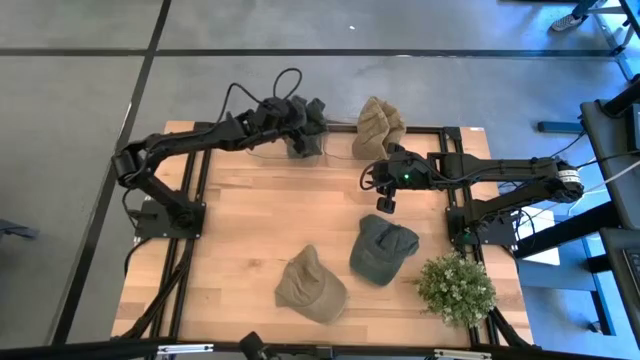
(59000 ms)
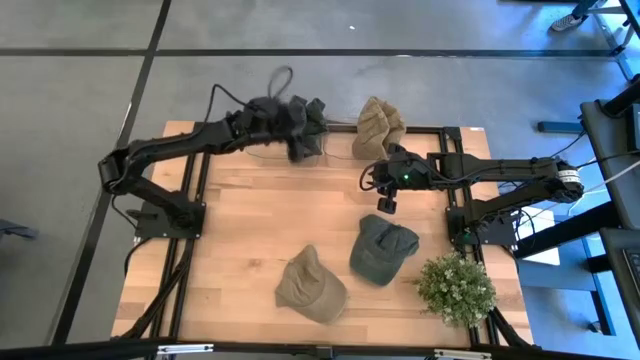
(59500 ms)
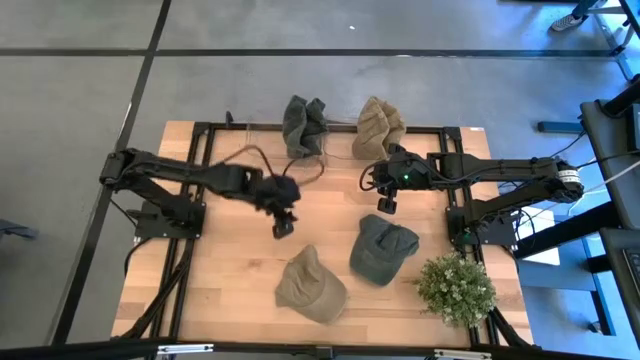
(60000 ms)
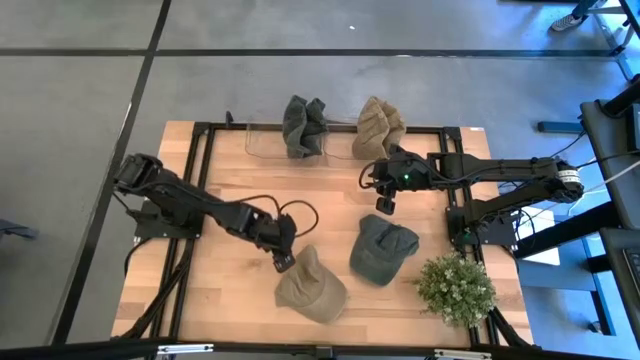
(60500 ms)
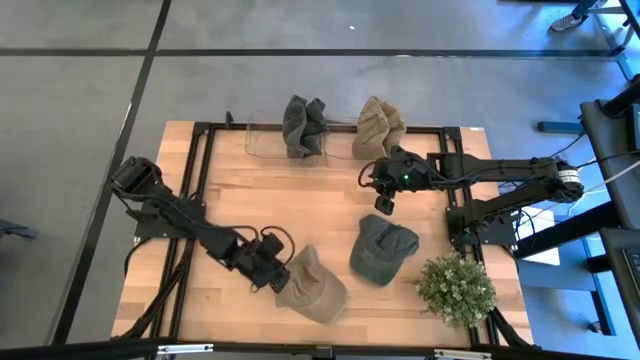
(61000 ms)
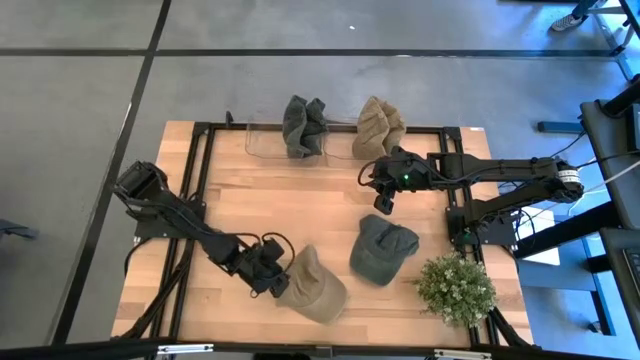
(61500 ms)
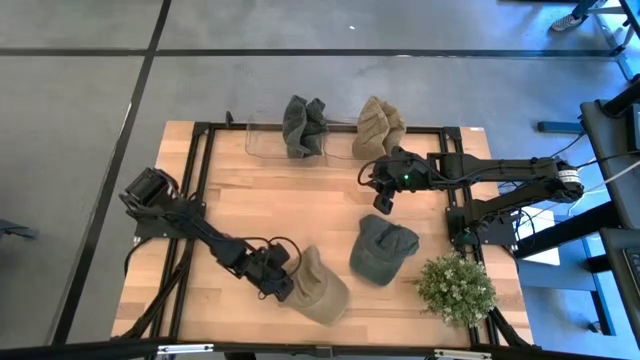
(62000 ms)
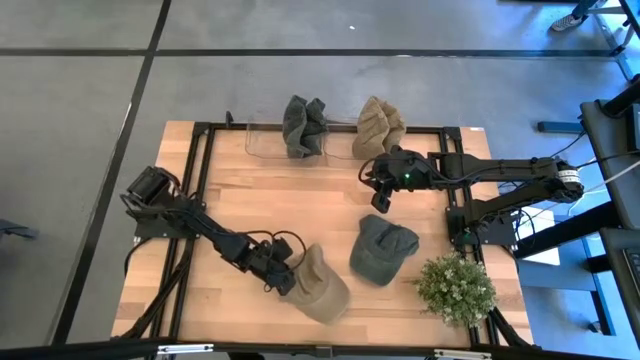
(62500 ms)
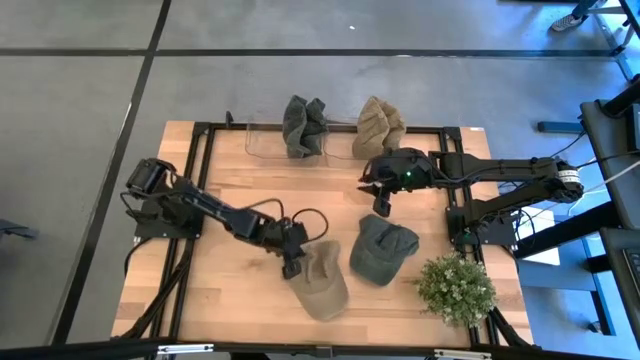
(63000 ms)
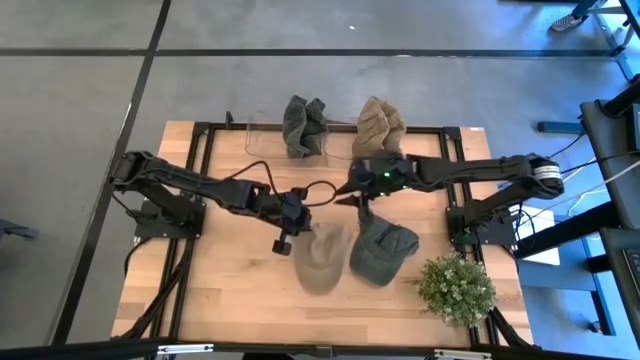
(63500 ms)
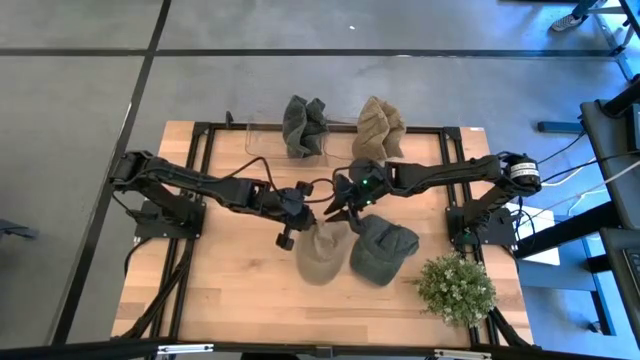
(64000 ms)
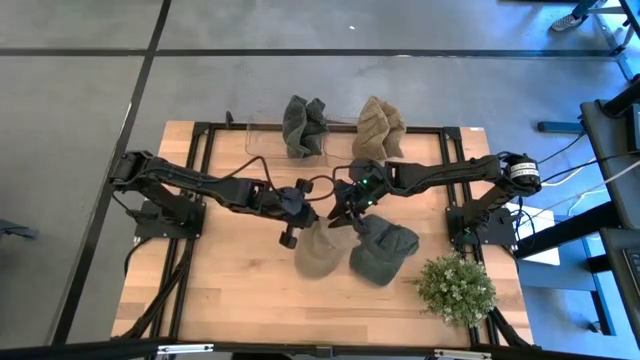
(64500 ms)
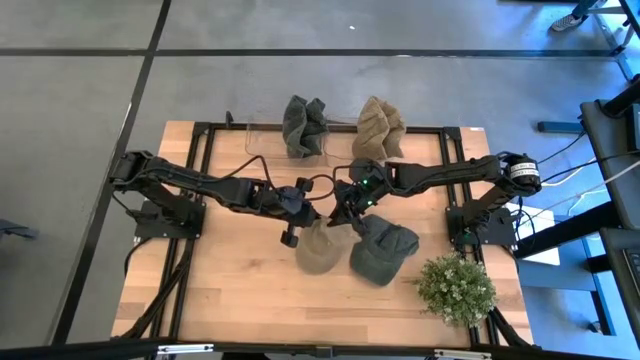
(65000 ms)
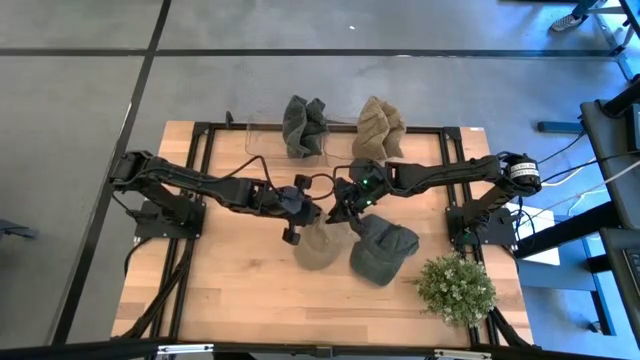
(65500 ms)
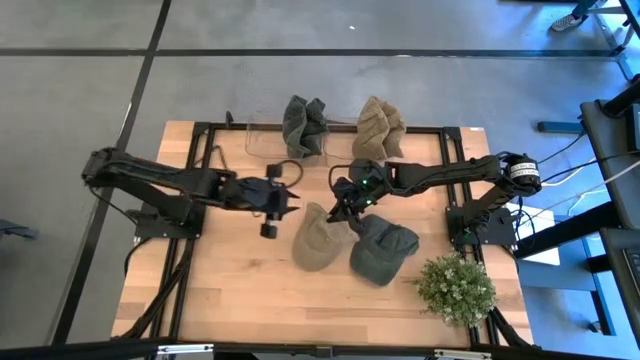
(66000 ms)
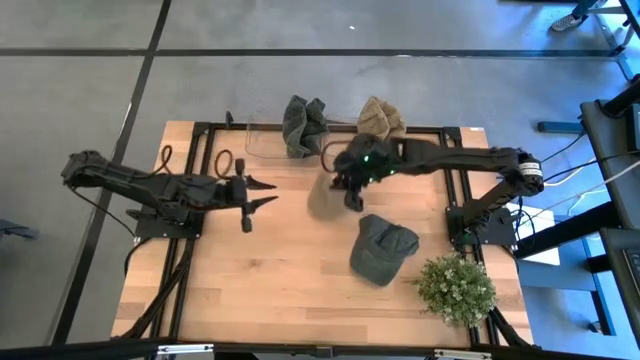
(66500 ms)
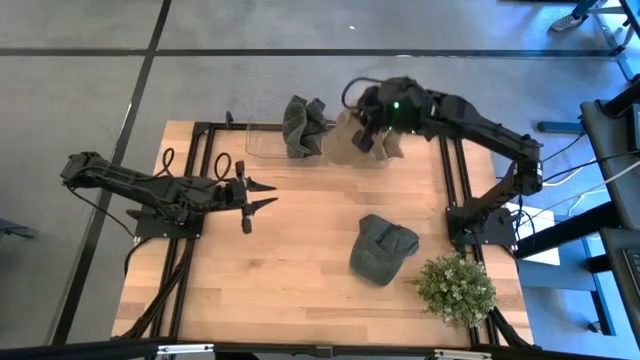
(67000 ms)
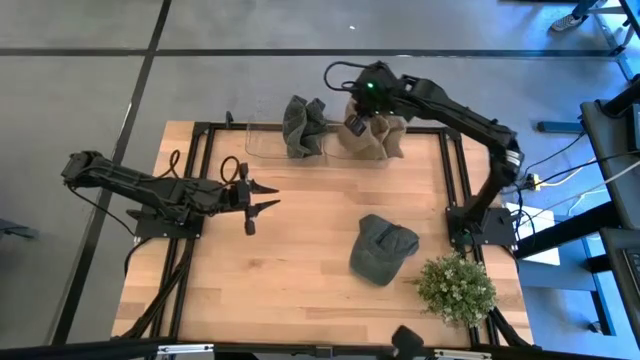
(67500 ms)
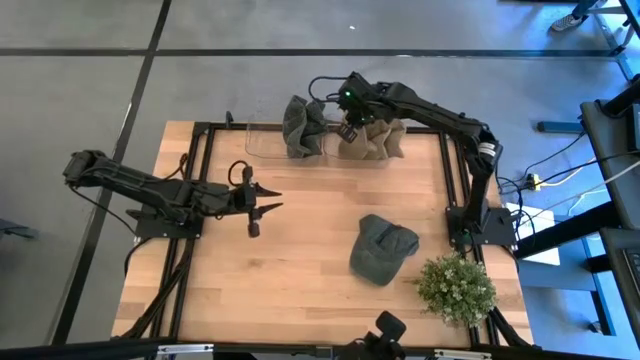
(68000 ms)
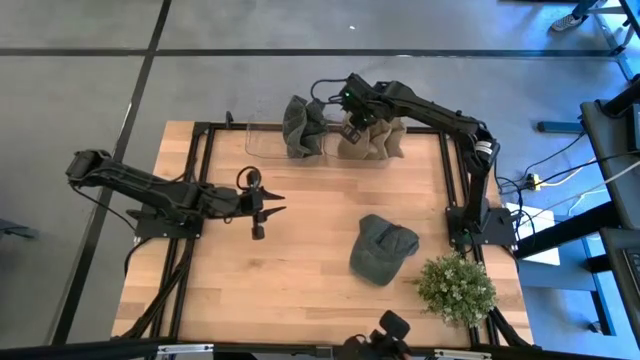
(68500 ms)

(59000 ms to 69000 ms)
Task: Pick & Place hat
Put the brown cap into the right transparent bin

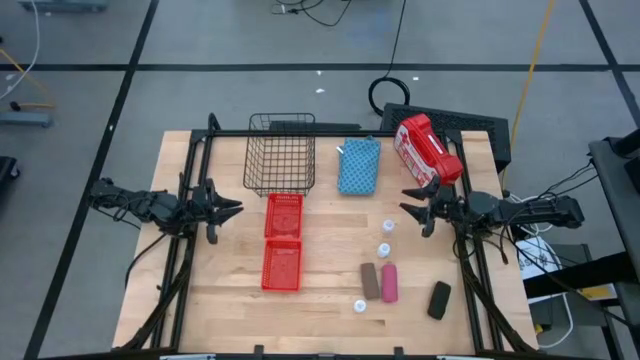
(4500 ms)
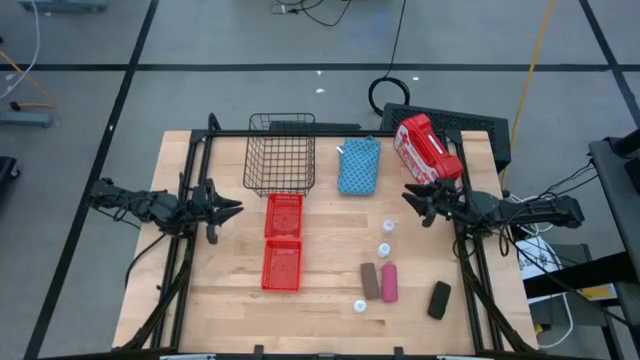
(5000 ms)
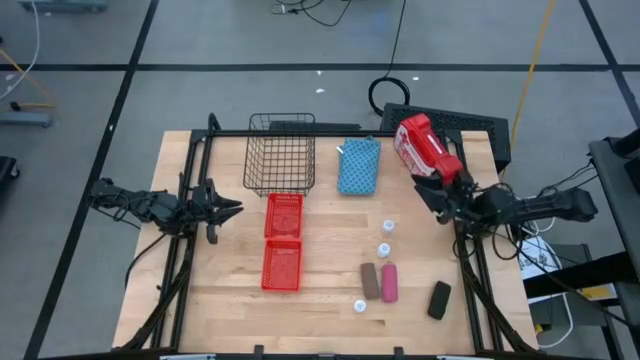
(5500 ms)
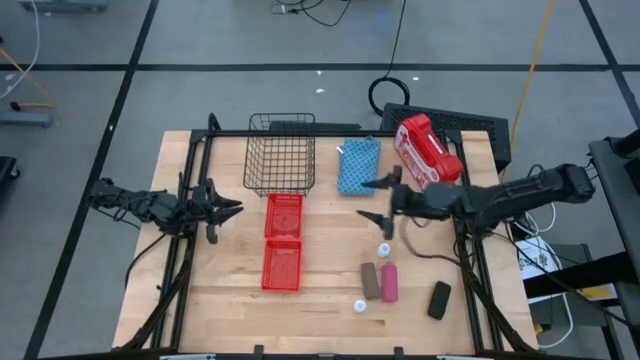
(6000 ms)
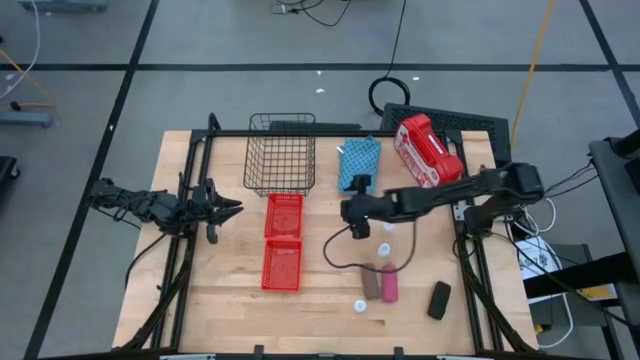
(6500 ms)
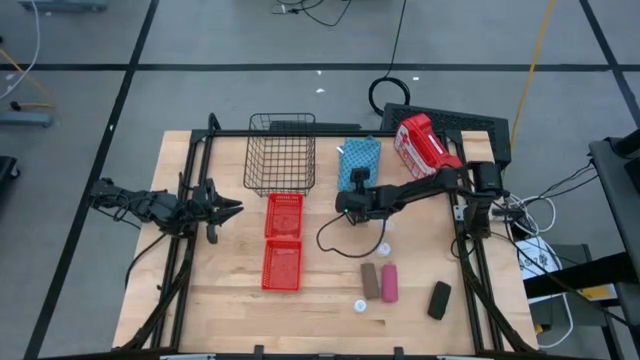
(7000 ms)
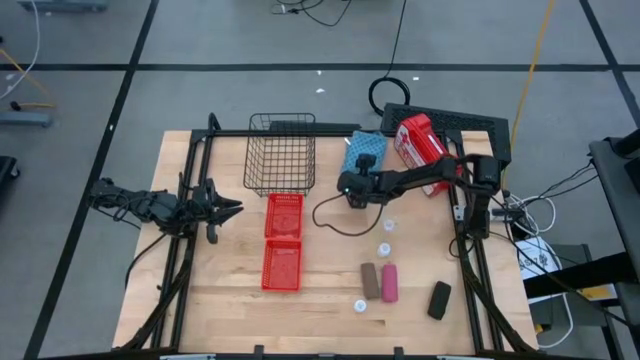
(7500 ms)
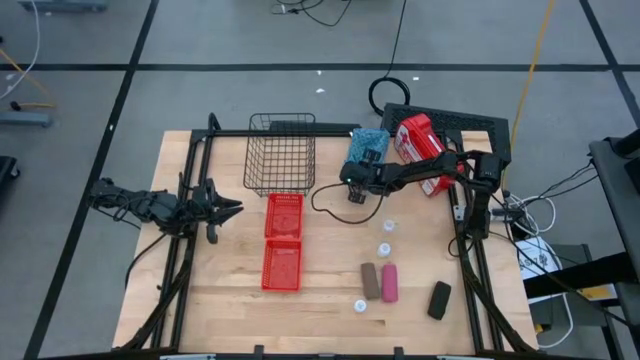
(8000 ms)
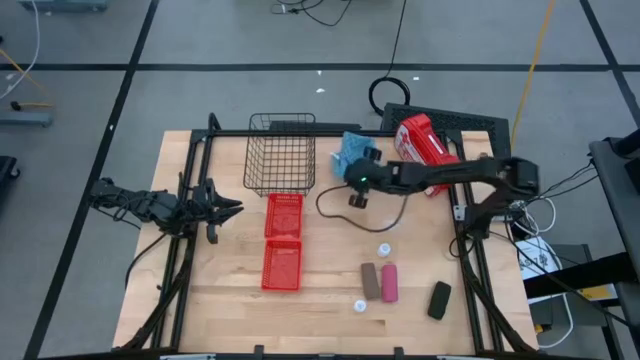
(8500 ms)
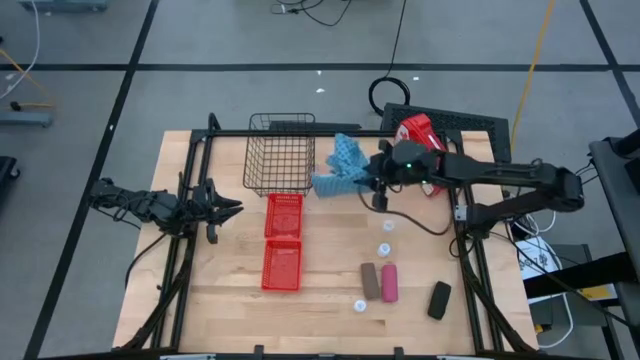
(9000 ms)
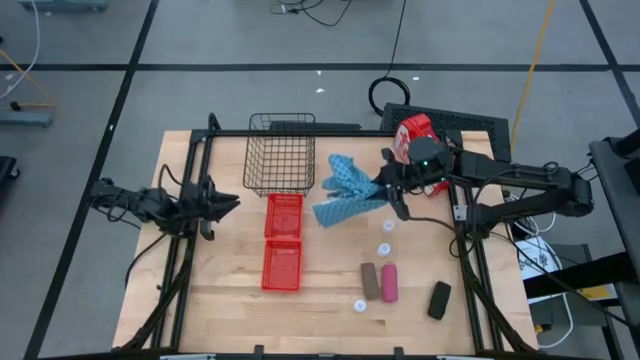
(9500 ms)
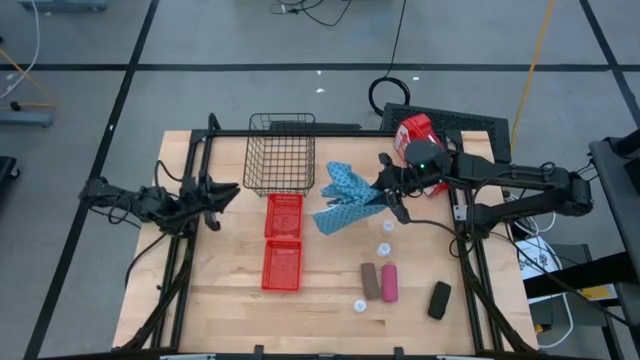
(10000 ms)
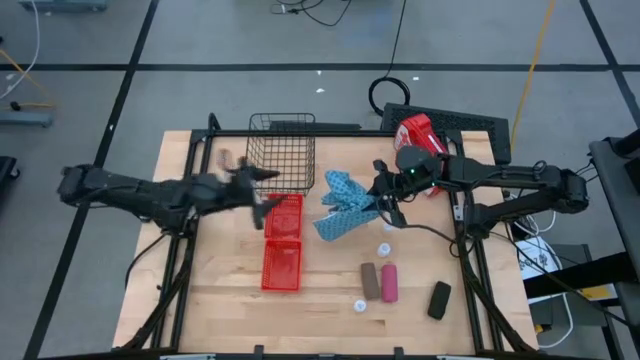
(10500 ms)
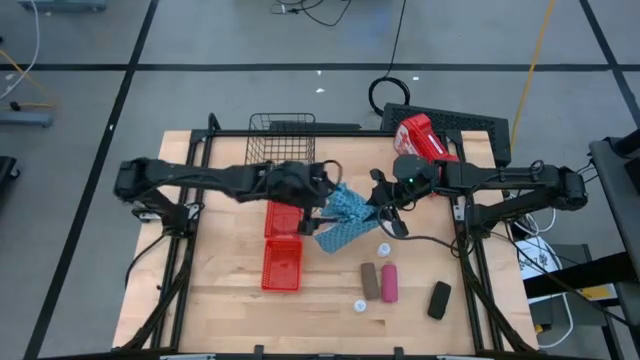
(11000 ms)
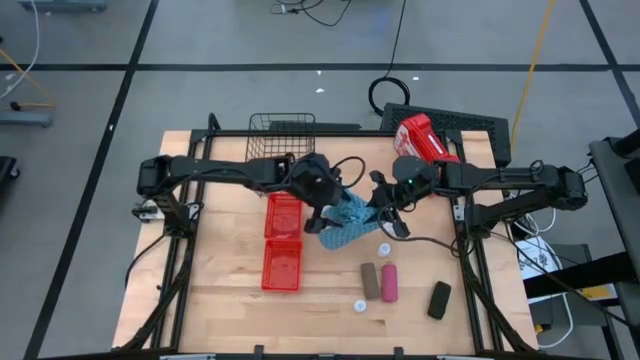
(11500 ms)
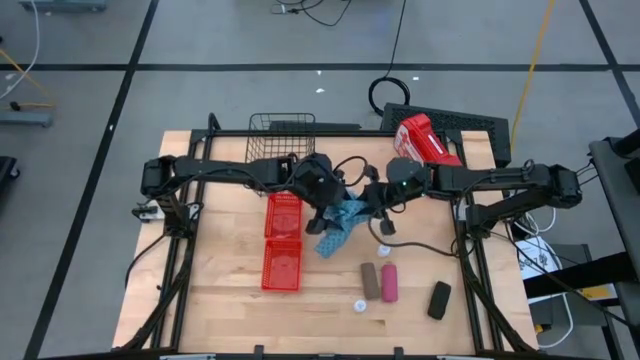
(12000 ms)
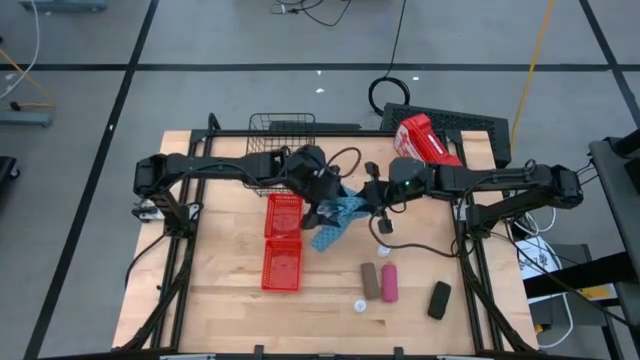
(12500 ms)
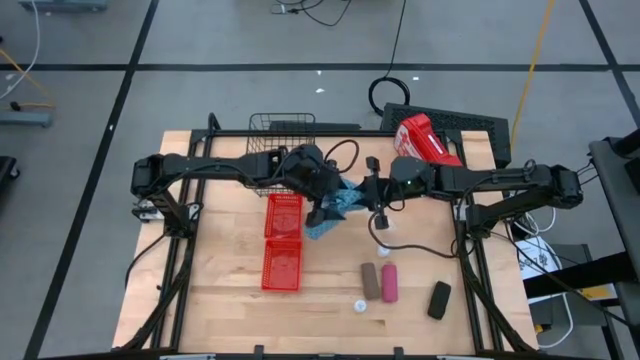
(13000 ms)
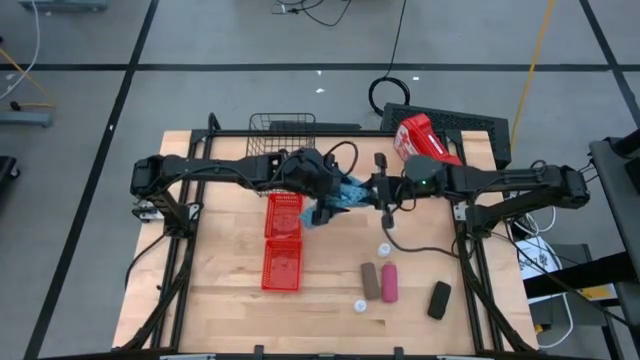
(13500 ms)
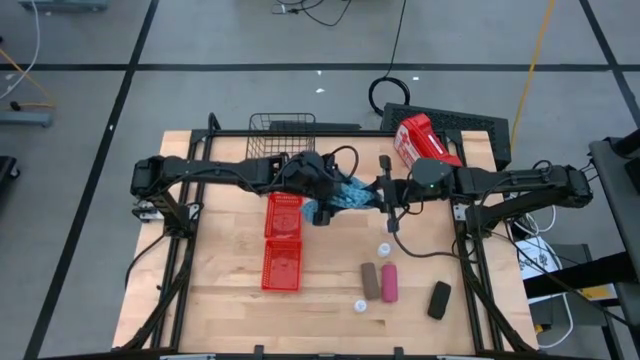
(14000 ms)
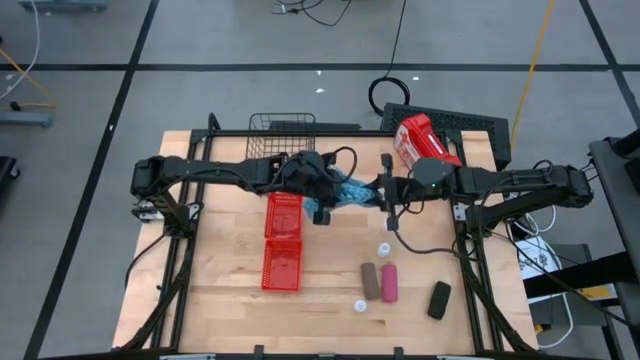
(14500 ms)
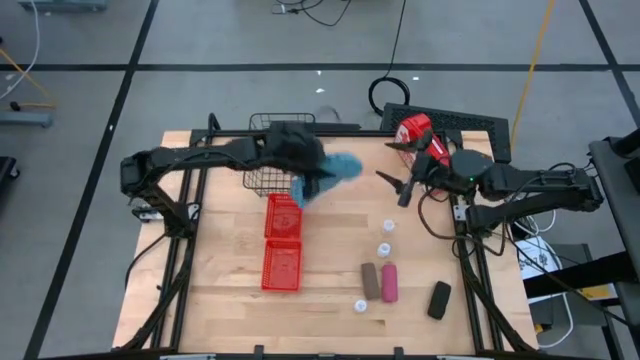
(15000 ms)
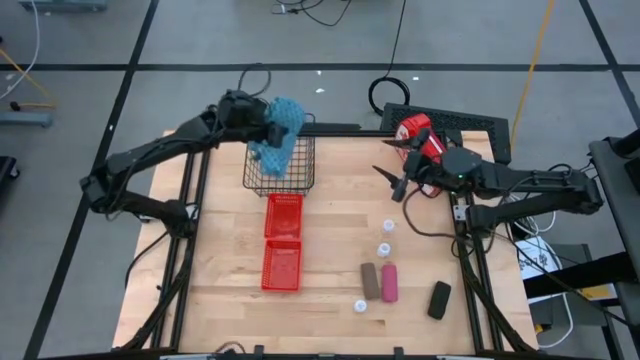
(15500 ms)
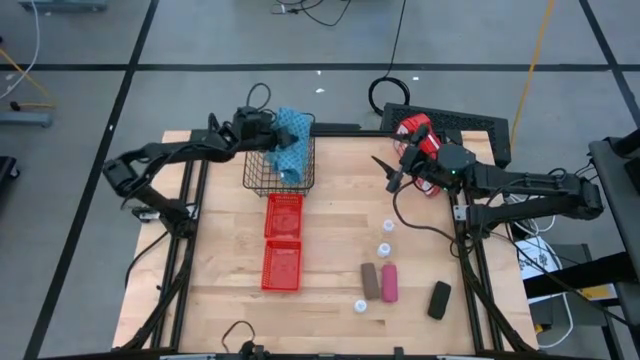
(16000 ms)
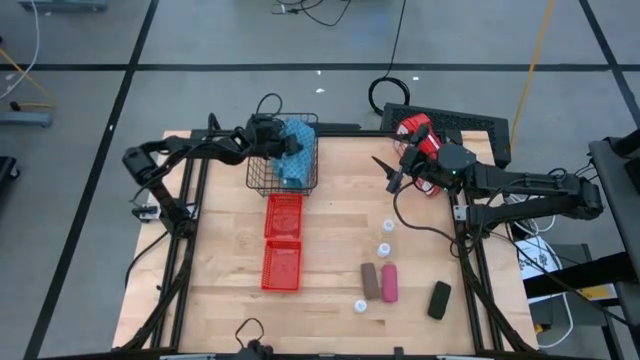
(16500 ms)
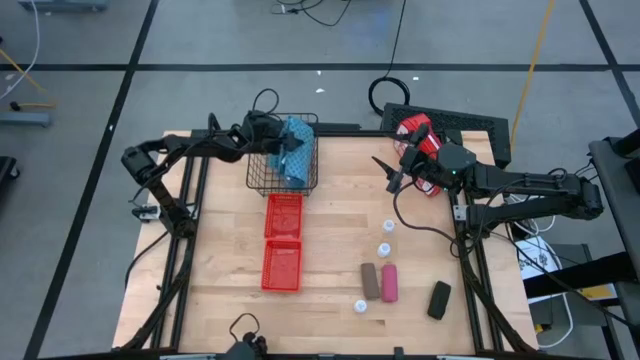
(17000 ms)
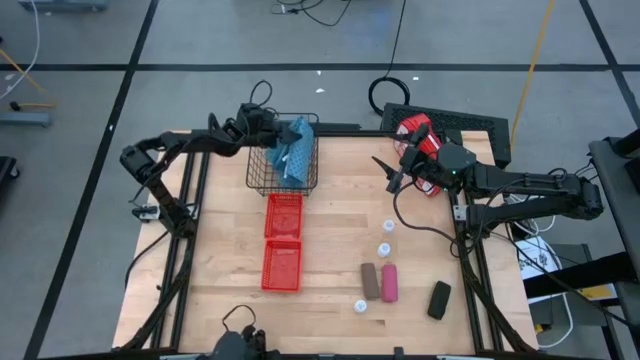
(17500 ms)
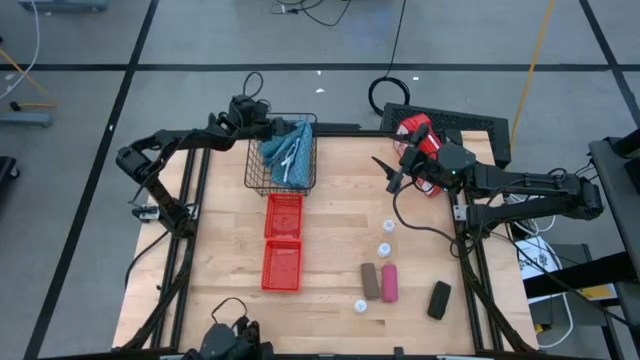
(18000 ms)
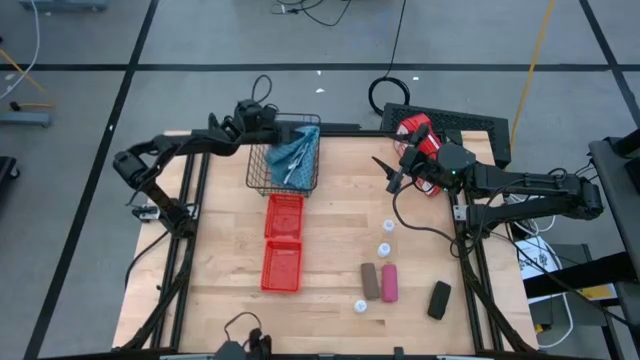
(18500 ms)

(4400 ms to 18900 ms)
Task: Pick & place medical supplies in basket/bin
Put the blue patient gown into the black wire basket
